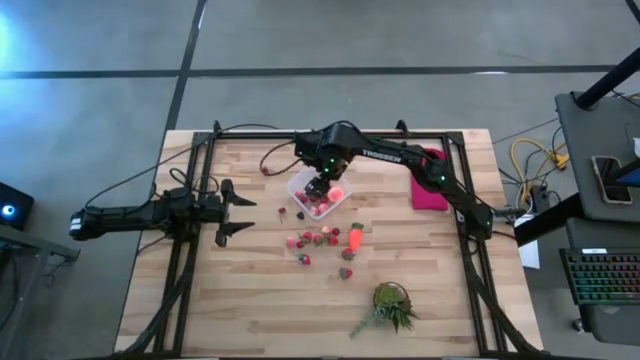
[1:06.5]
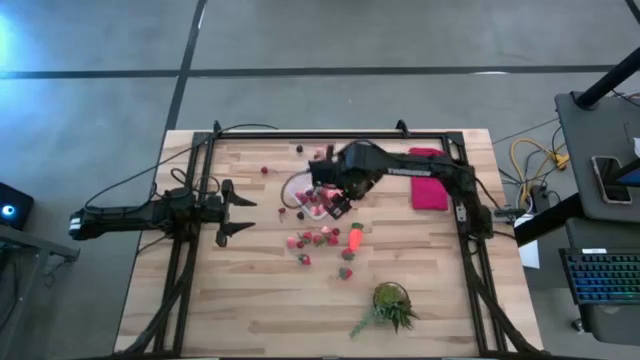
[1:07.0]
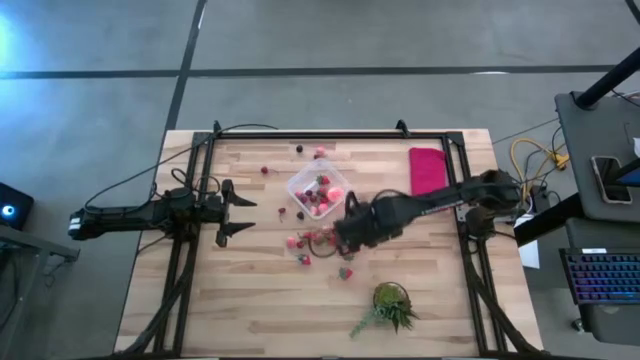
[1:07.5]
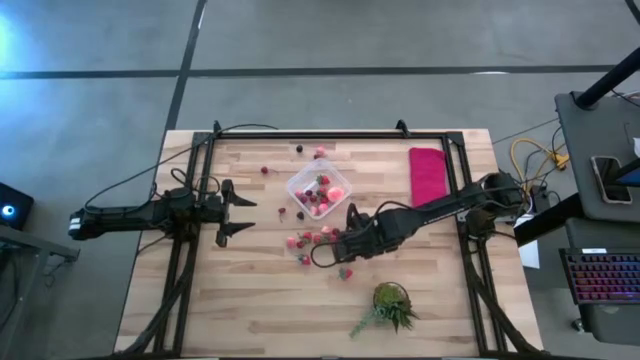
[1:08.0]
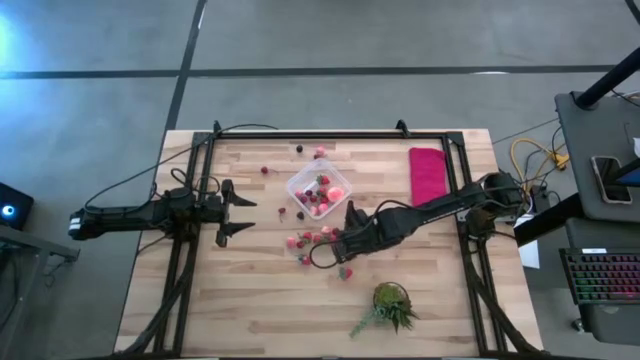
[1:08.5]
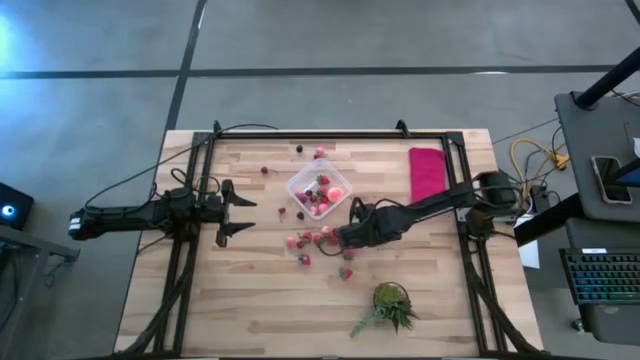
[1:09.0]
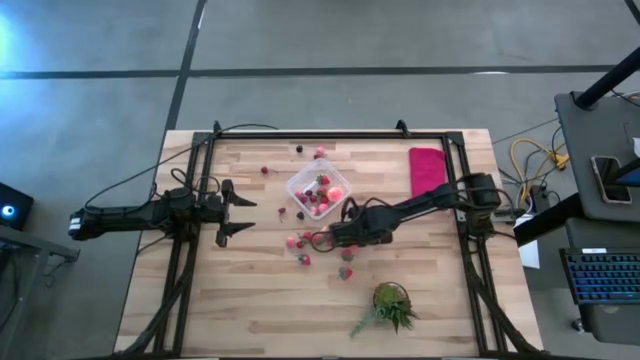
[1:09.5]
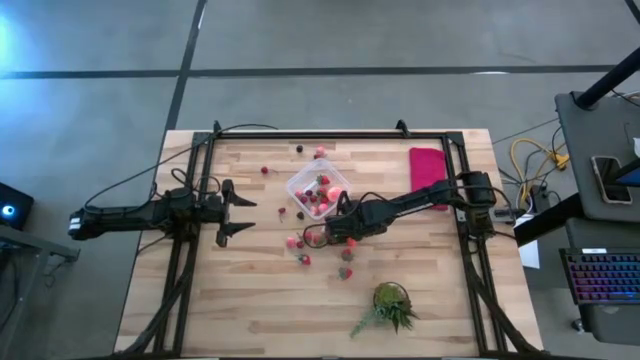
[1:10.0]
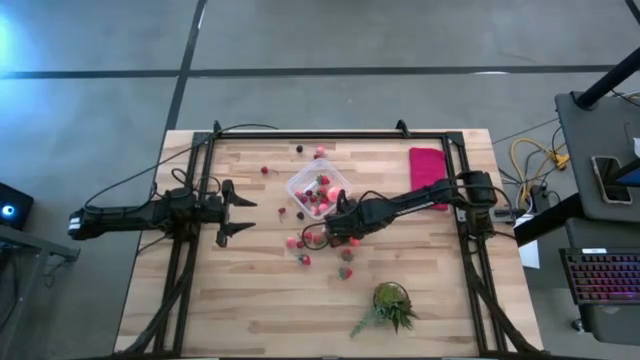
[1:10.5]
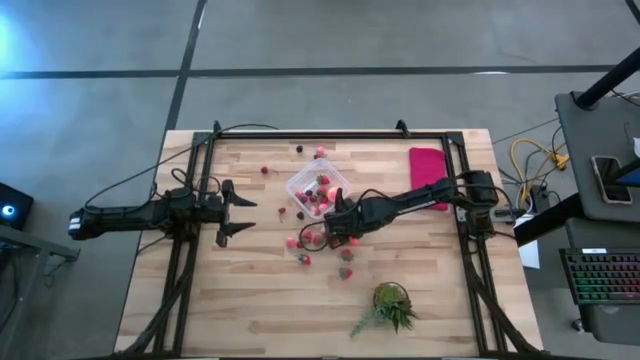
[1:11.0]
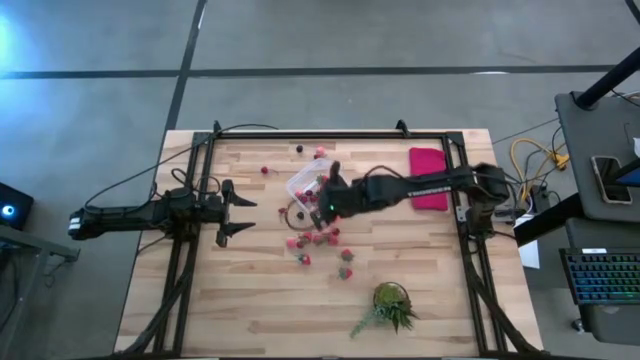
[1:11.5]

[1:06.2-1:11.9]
Task: Pick and placing Produce into tupperware
Put the orange carrot into the transparent container

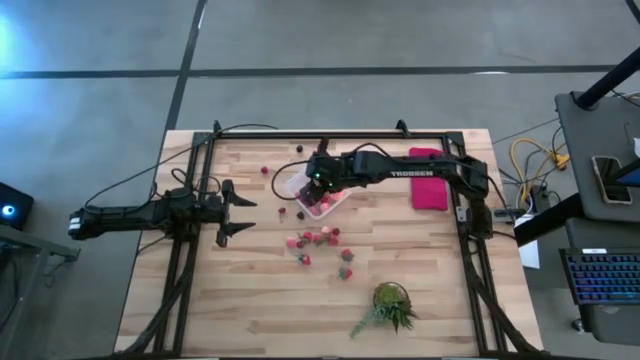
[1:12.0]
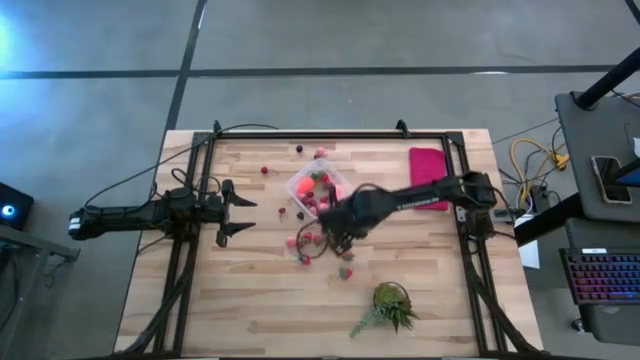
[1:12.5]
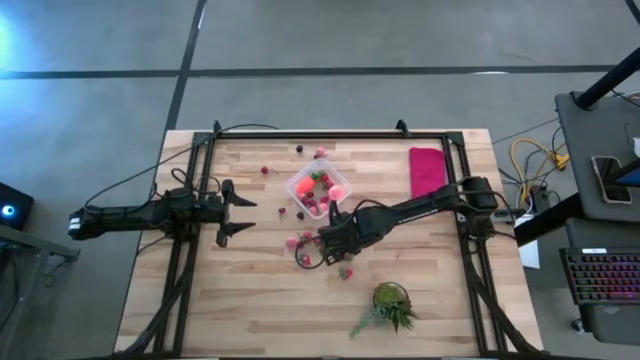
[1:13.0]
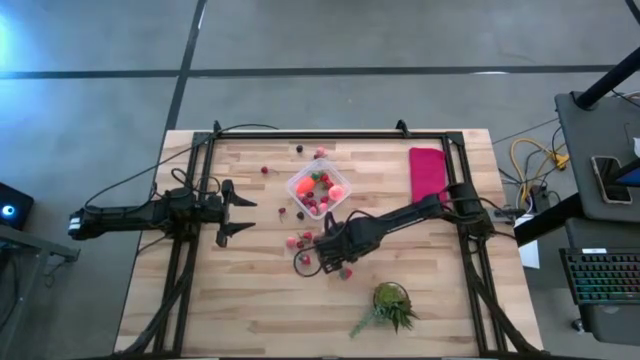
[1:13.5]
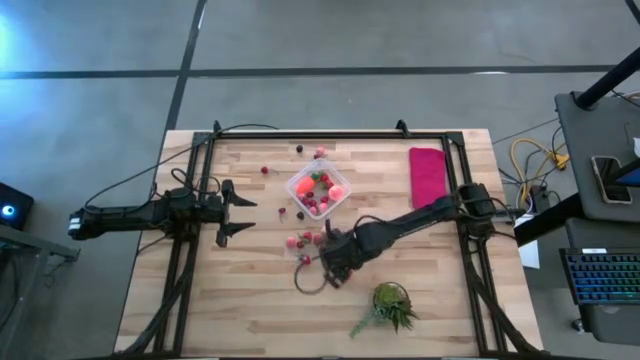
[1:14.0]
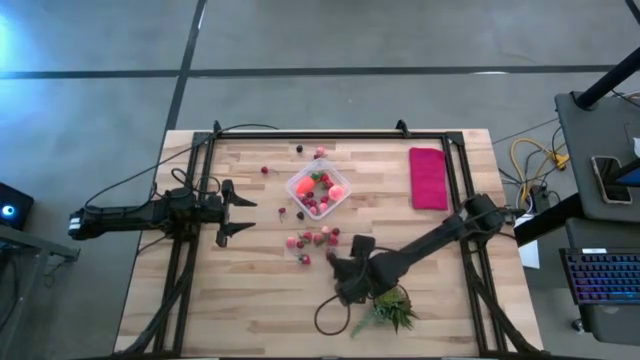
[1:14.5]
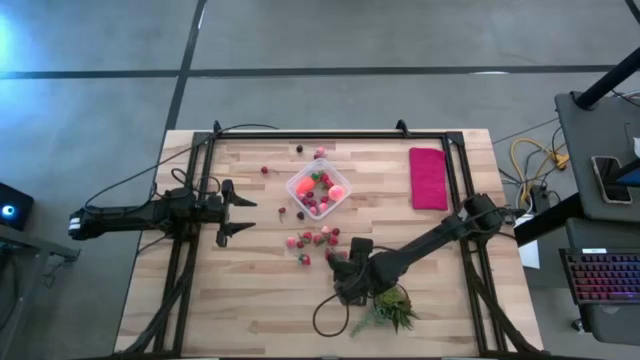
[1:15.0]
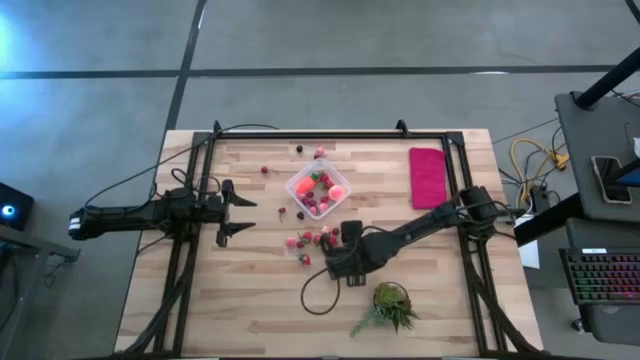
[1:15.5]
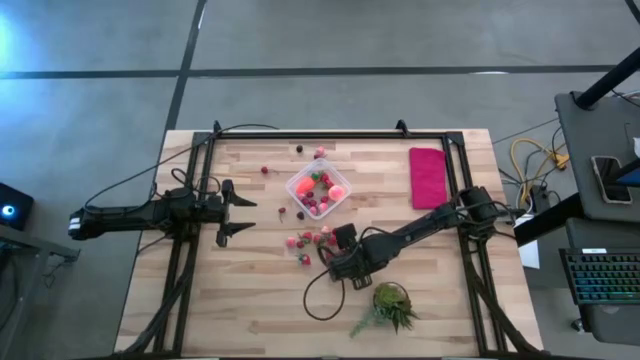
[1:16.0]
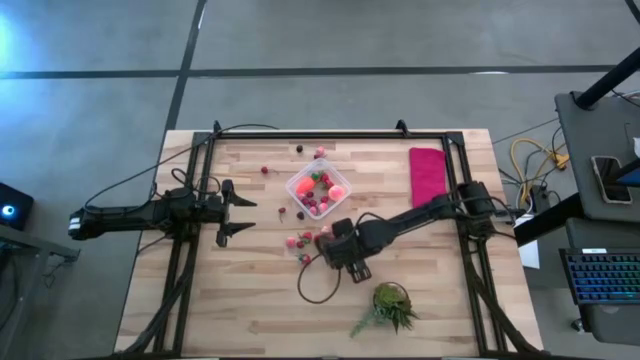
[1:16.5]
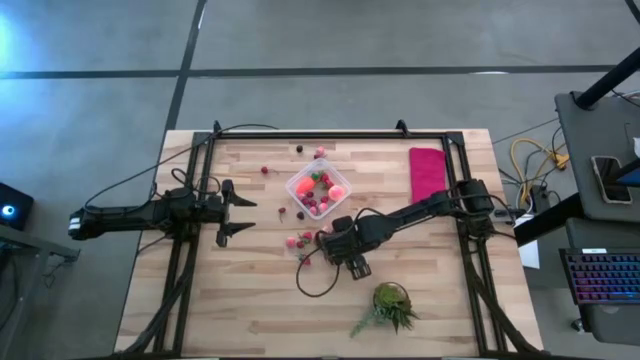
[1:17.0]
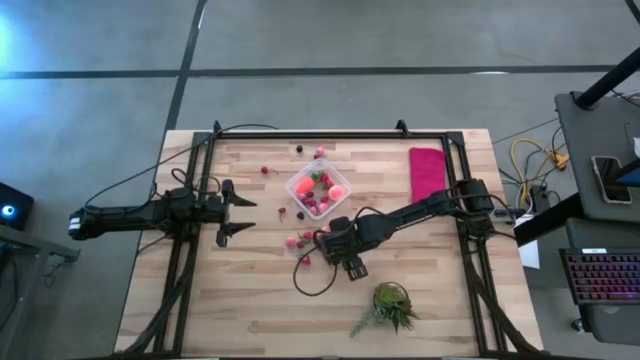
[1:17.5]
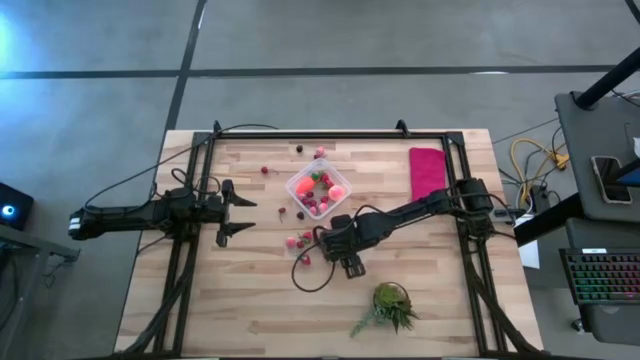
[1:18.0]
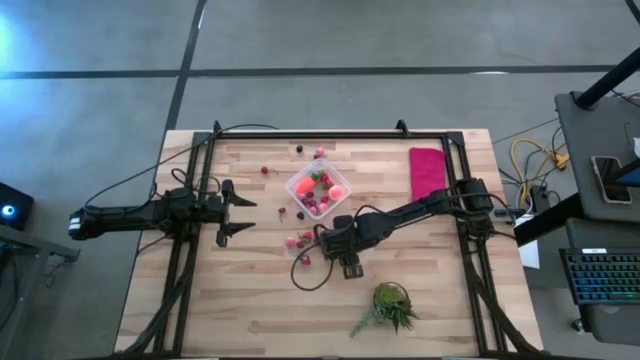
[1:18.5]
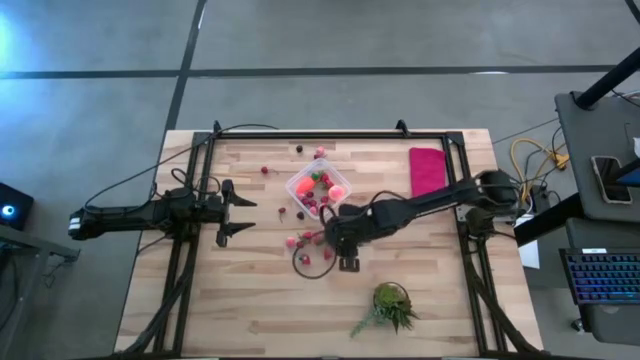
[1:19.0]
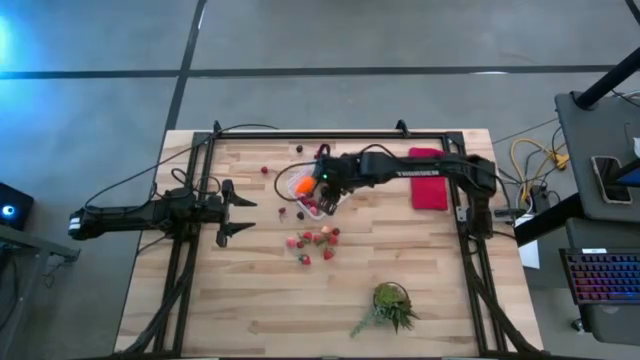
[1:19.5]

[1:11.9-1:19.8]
Put the red strawberry into the transparent container

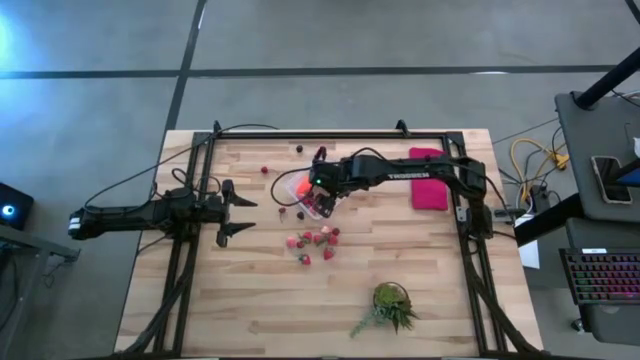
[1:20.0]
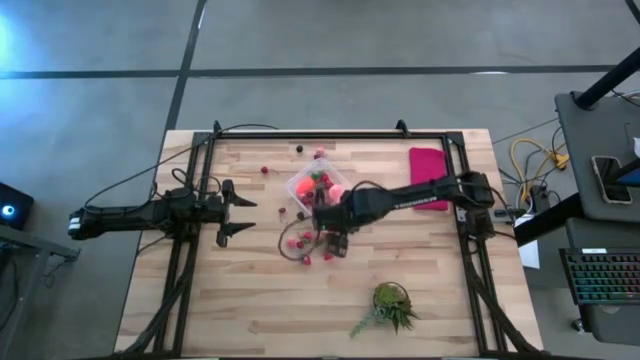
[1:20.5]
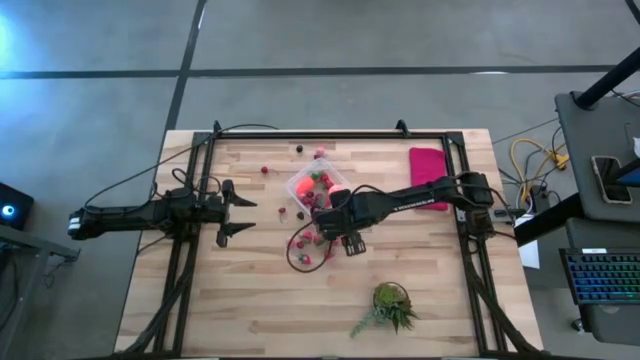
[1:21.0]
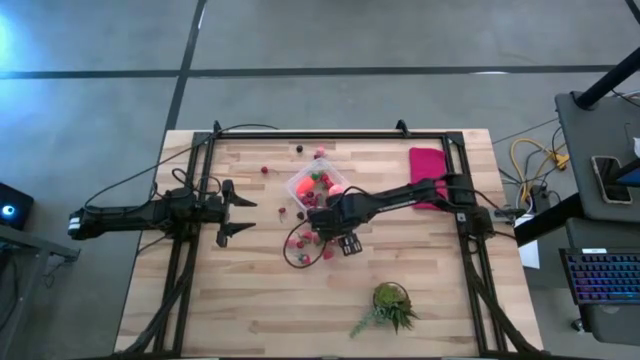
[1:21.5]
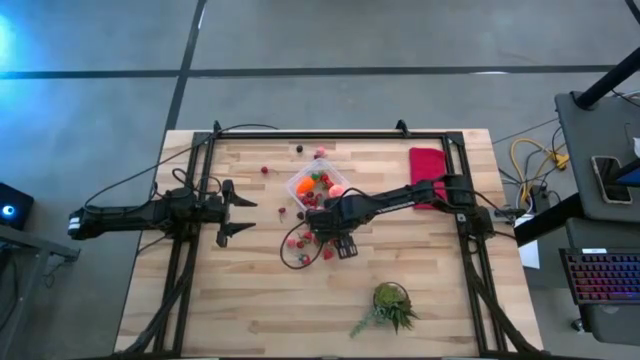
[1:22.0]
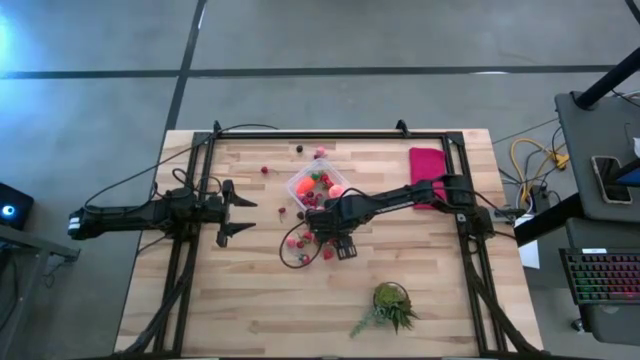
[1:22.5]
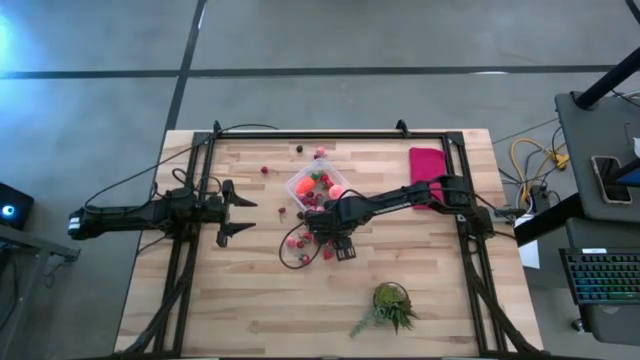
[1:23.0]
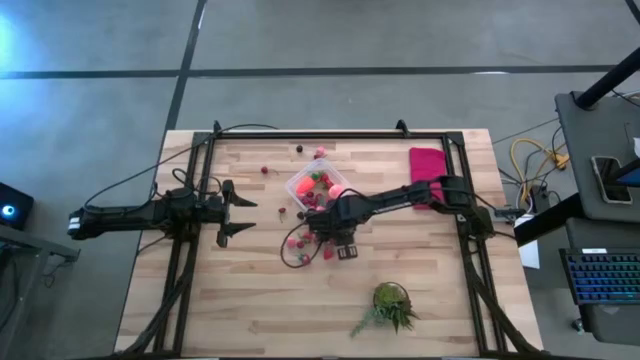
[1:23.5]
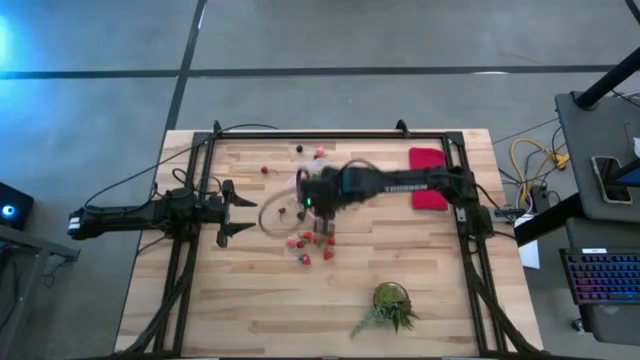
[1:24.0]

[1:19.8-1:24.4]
Put the red cherry into the transparent container

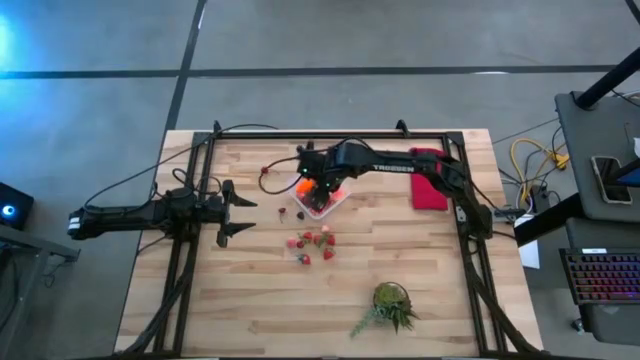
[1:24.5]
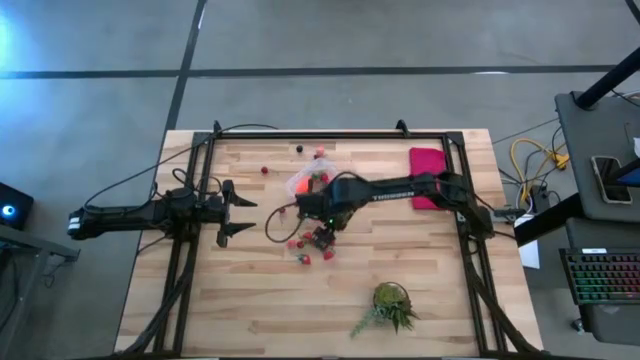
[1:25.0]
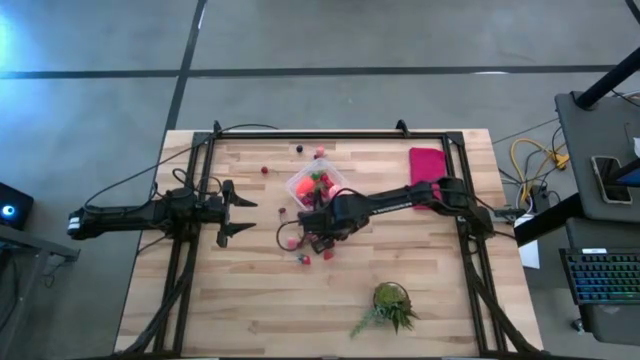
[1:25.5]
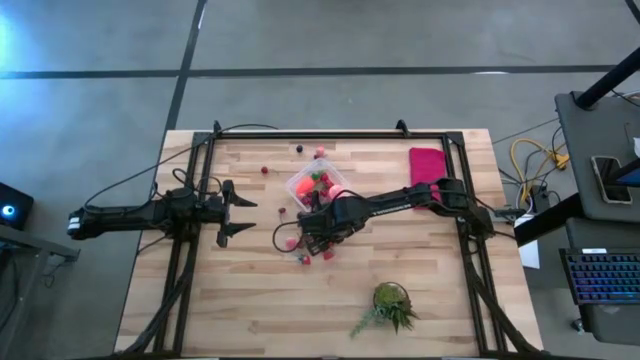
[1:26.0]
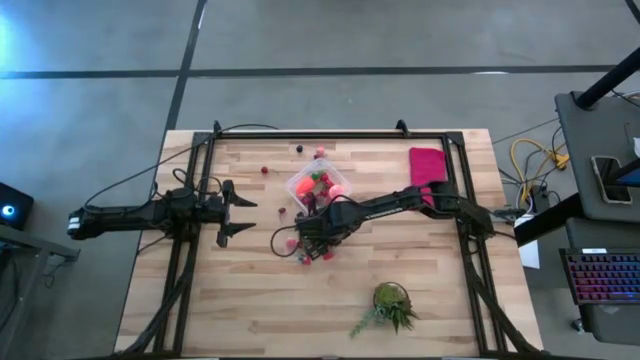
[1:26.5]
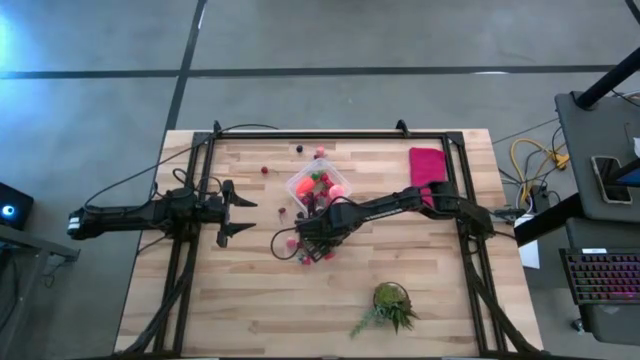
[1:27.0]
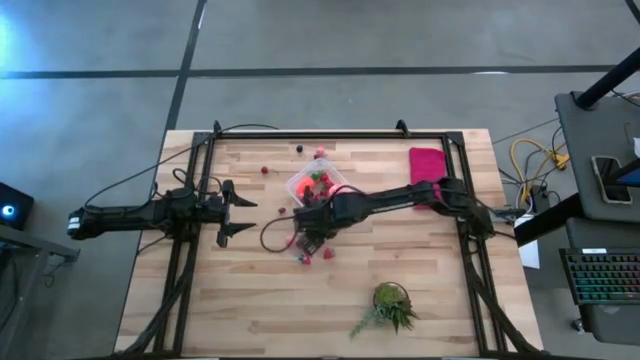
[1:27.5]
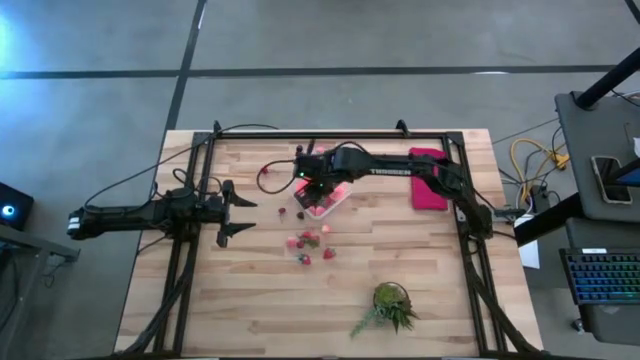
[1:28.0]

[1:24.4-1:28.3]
Put the red strawberry into the transparent container
